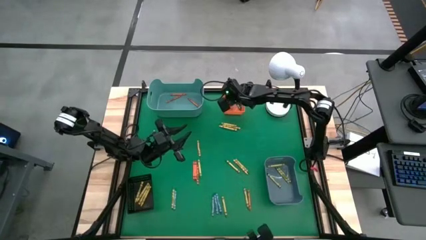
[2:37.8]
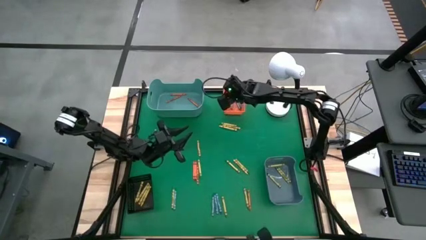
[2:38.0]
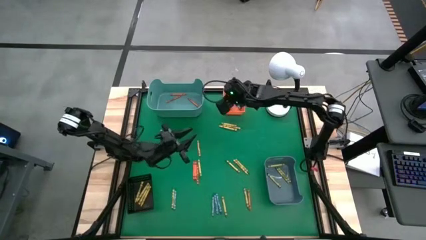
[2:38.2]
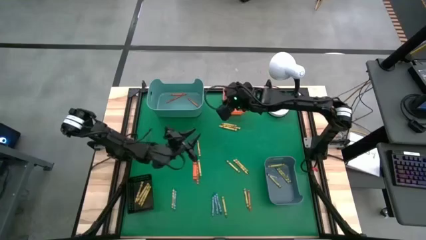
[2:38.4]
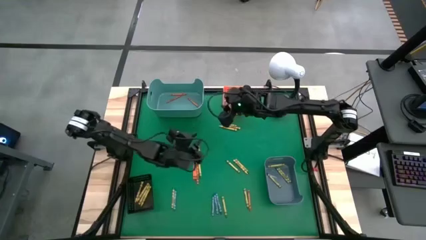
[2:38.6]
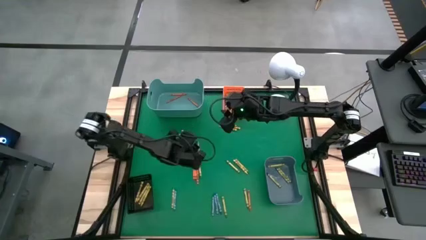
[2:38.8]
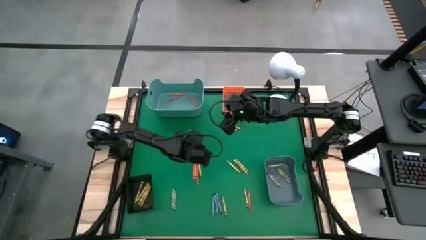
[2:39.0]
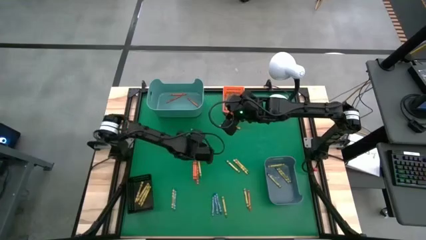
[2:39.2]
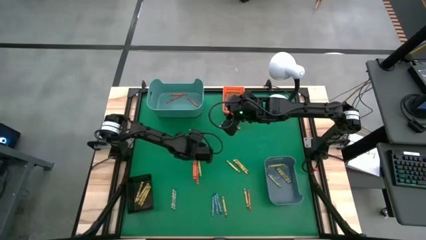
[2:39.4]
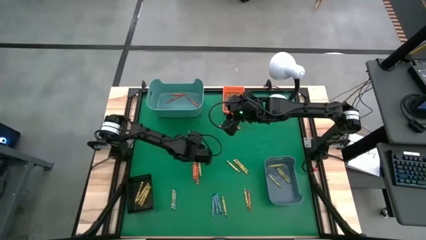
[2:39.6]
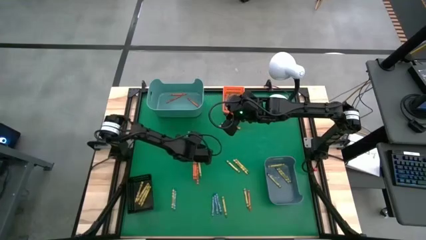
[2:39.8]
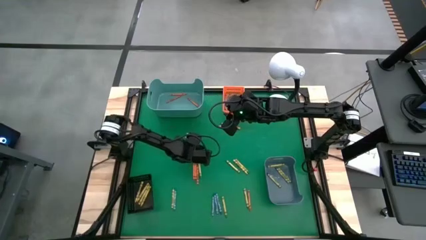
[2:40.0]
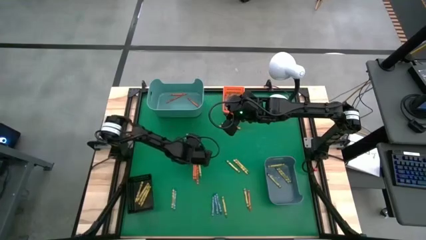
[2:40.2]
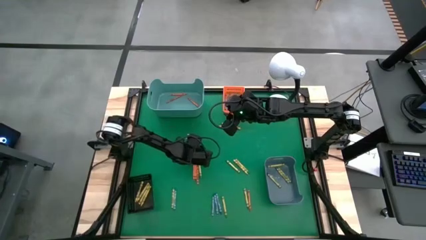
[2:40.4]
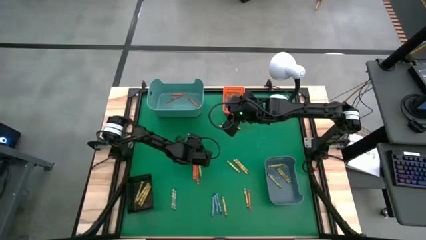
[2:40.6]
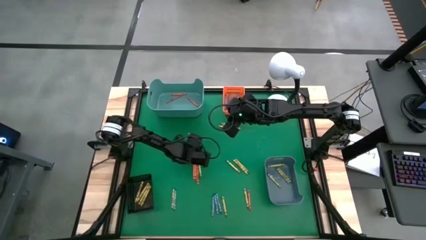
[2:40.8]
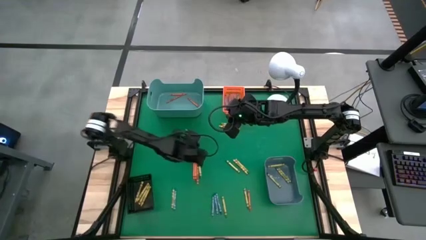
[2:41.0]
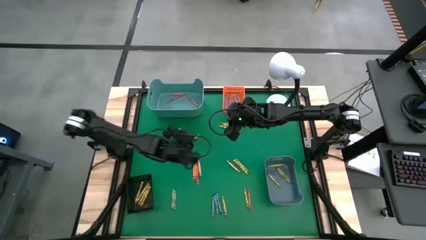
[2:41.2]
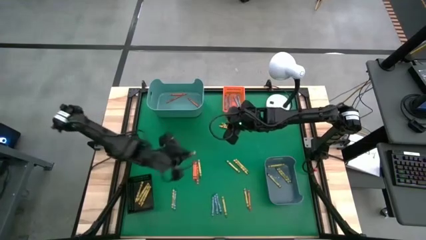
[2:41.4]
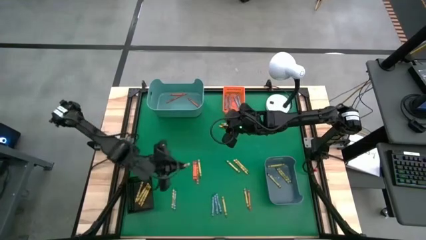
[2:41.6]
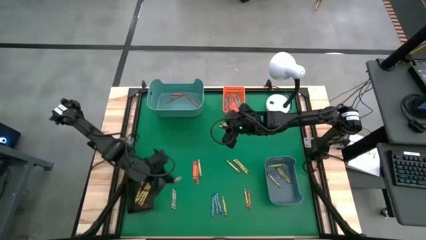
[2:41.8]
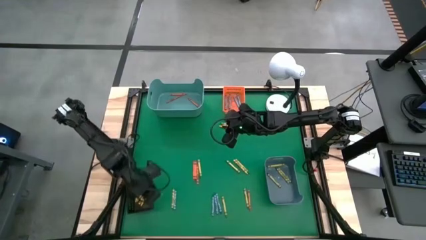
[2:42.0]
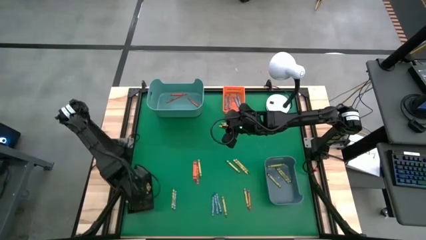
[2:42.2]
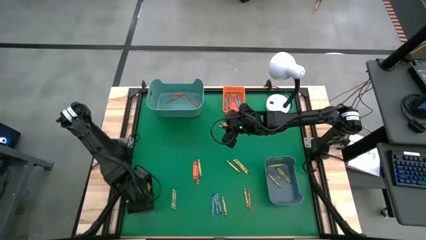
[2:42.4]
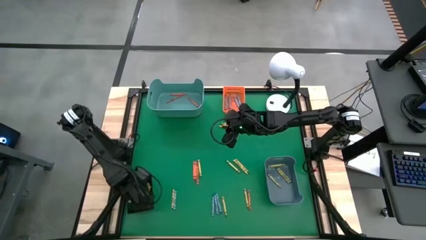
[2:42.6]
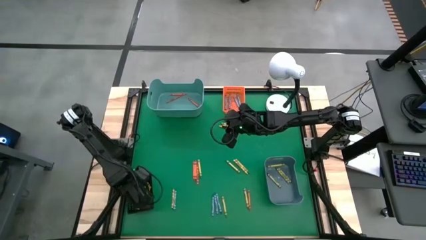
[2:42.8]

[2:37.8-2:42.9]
Task: Sort crayons
Put the yellow crayon into the black bin

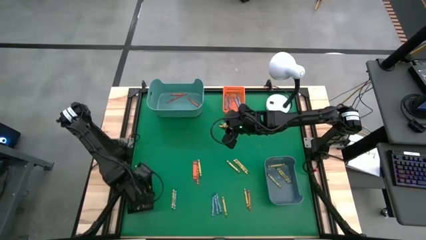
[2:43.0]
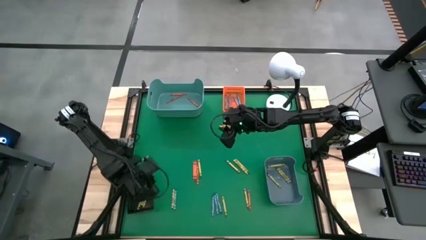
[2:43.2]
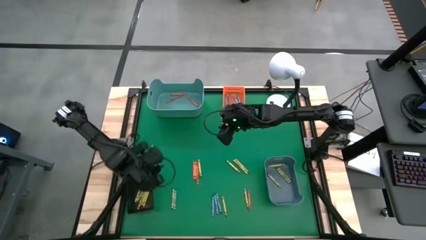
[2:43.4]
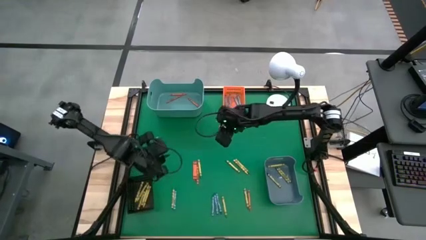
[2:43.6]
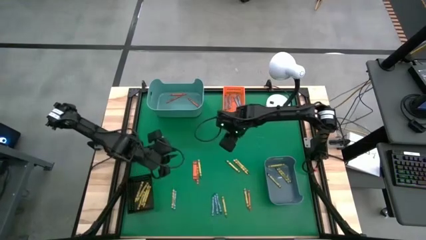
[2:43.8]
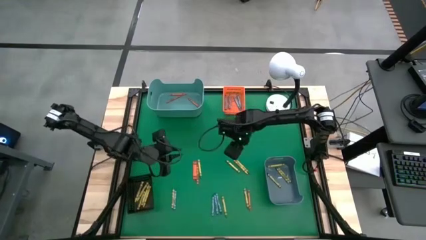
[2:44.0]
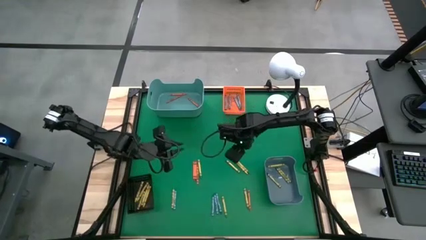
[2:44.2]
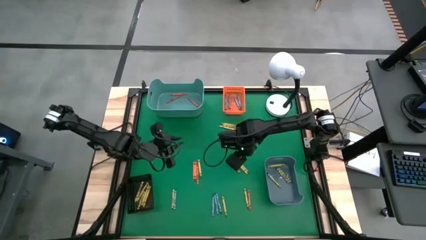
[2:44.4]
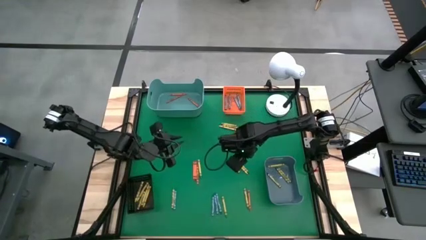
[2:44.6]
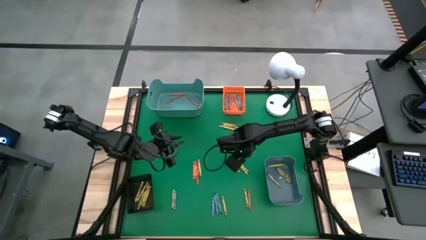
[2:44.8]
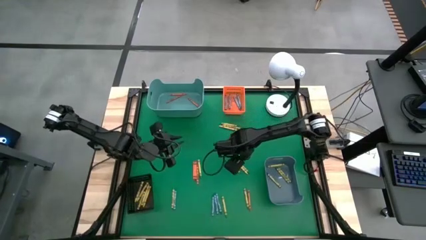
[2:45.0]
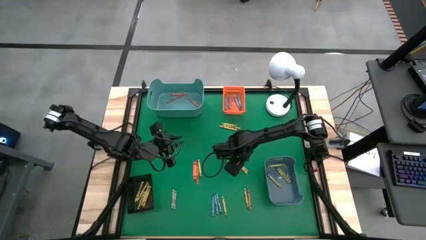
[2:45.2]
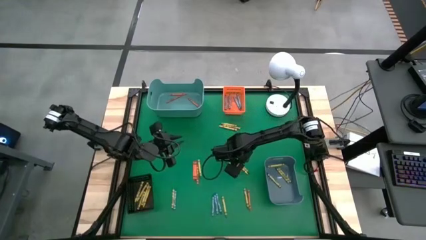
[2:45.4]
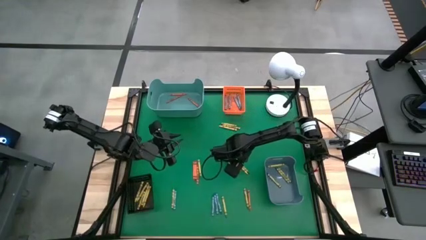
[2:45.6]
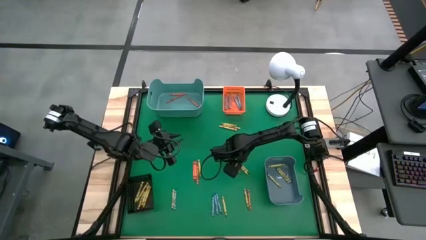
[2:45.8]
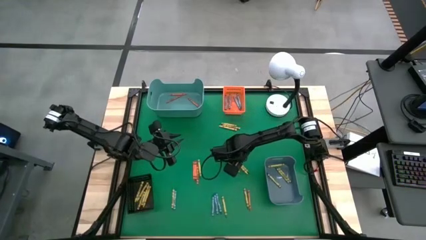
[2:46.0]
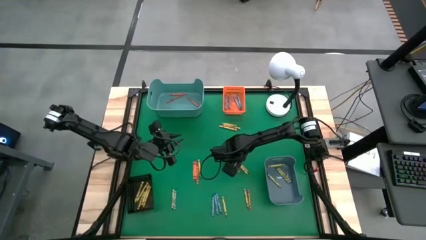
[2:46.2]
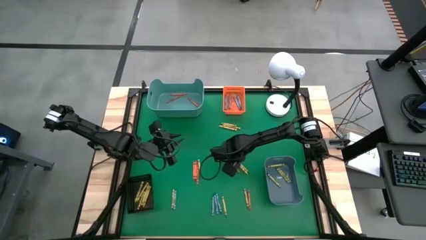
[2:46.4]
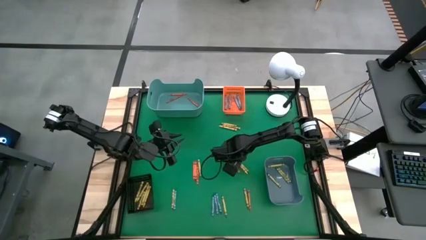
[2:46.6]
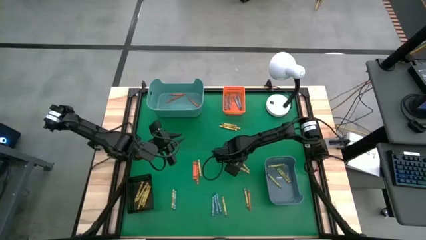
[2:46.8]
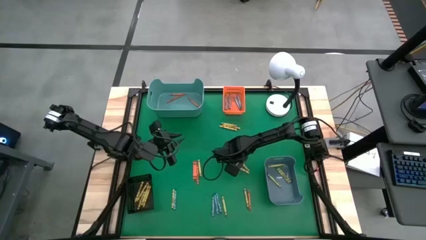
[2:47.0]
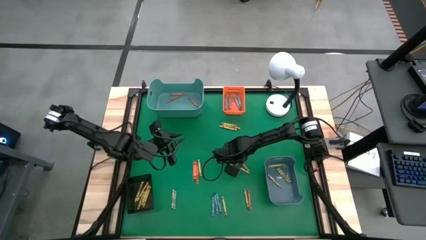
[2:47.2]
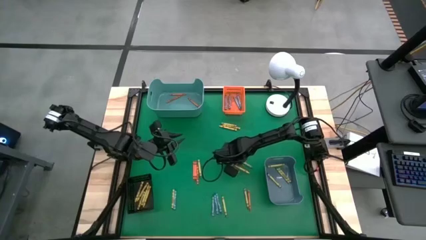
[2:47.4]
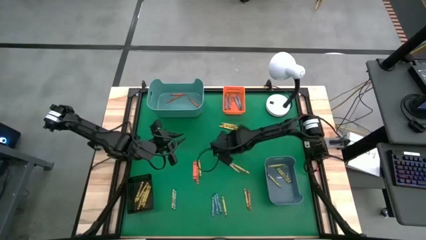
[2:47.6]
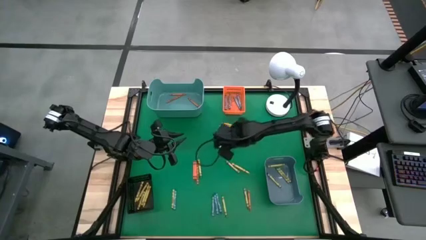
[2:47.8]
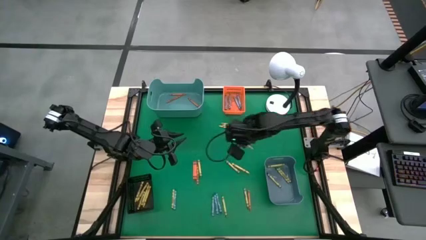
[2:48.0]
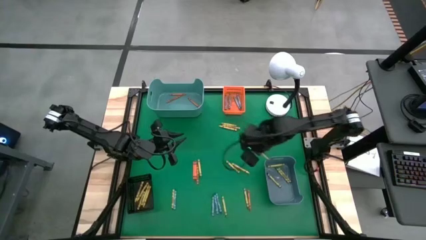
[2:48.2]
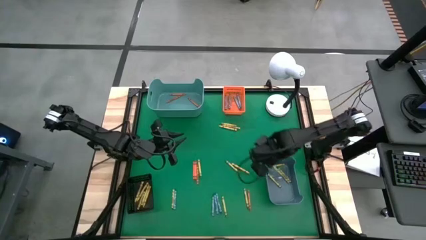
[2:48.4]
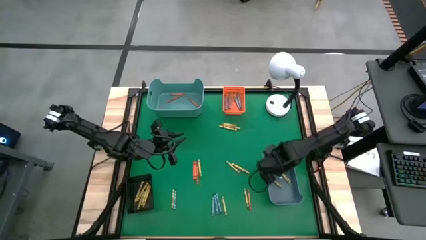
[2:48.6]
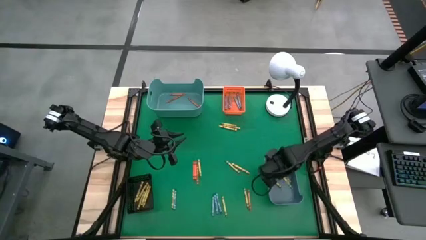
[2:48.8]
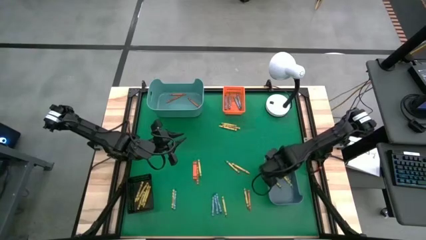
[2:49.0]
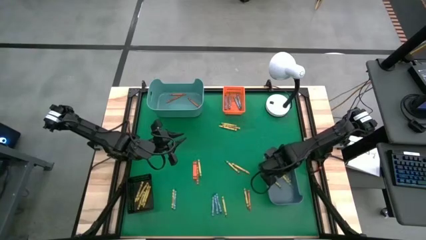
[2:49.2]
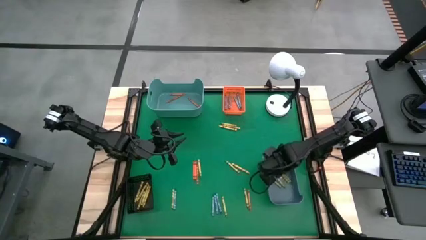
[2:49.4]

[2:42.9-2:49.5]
Put the green crayon into the blue bin
